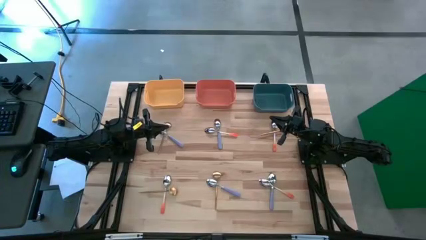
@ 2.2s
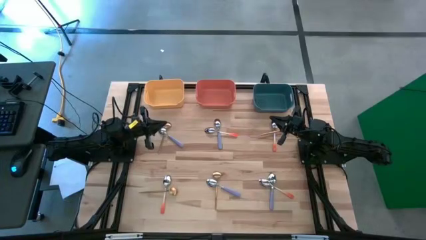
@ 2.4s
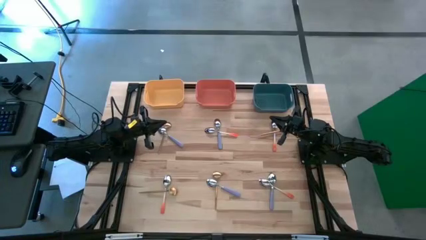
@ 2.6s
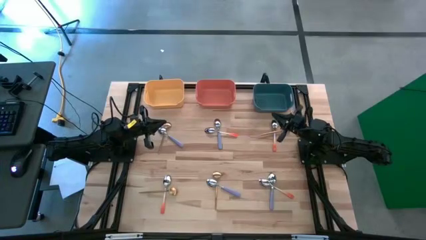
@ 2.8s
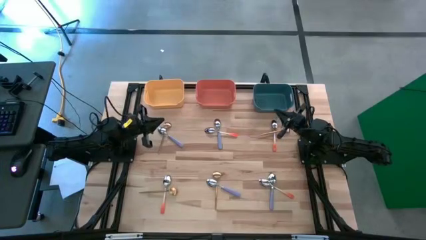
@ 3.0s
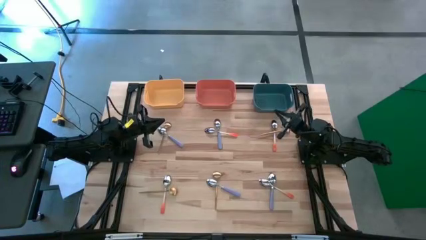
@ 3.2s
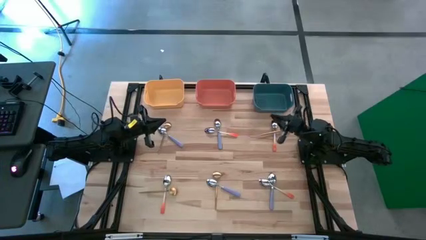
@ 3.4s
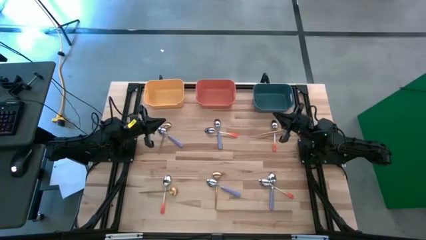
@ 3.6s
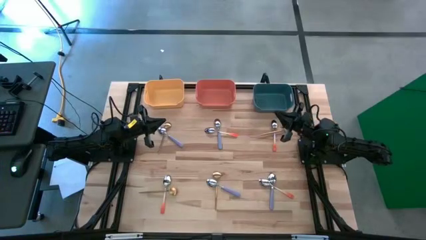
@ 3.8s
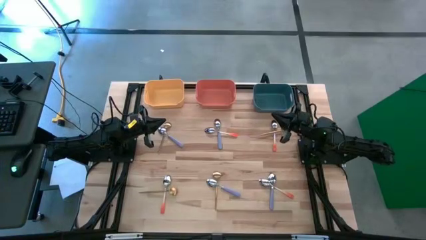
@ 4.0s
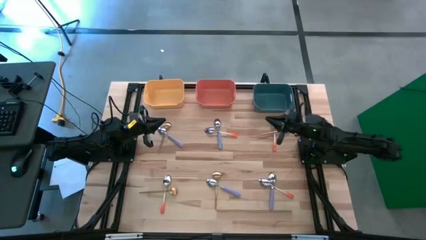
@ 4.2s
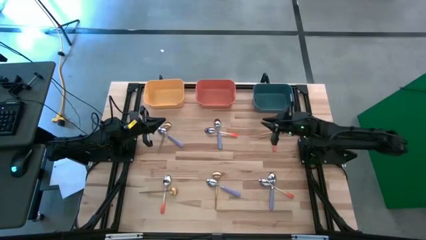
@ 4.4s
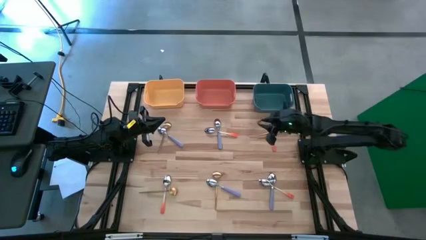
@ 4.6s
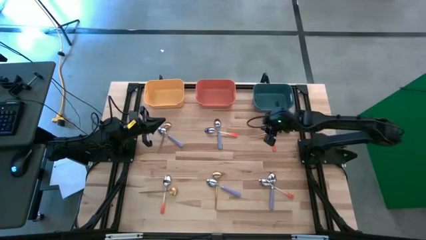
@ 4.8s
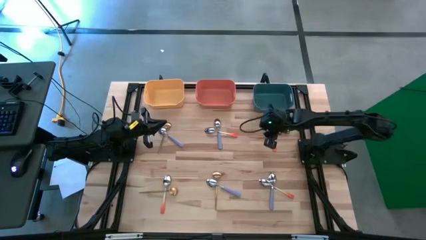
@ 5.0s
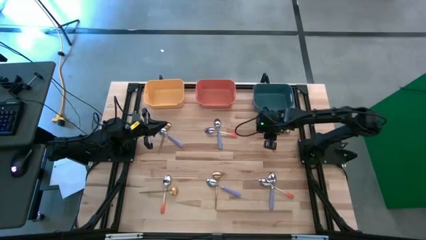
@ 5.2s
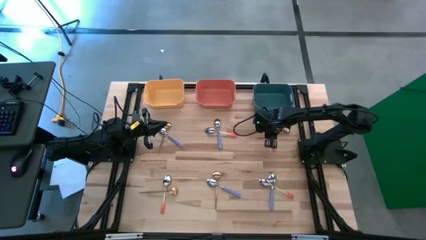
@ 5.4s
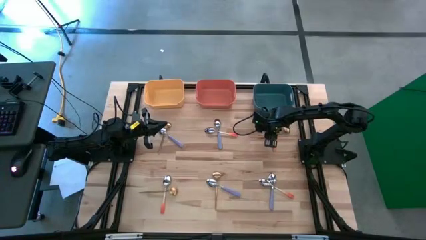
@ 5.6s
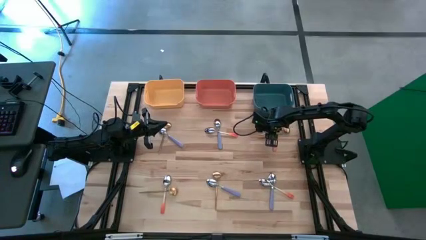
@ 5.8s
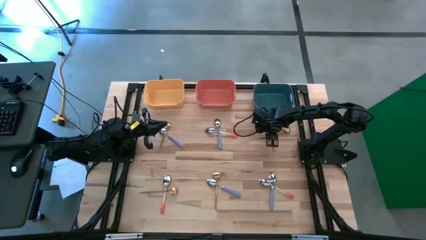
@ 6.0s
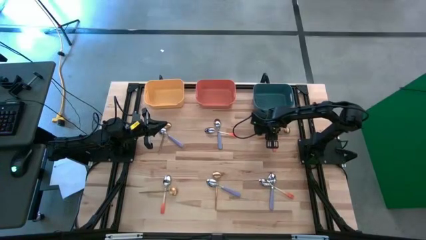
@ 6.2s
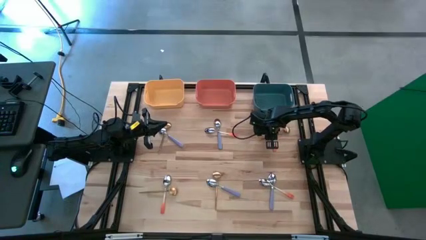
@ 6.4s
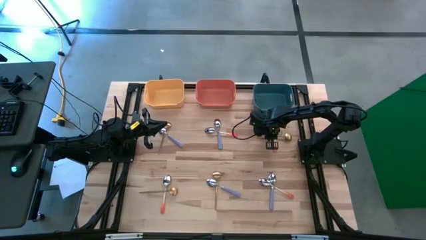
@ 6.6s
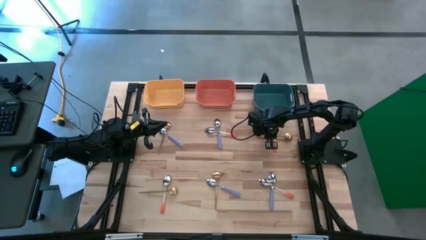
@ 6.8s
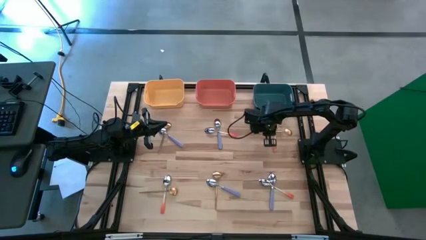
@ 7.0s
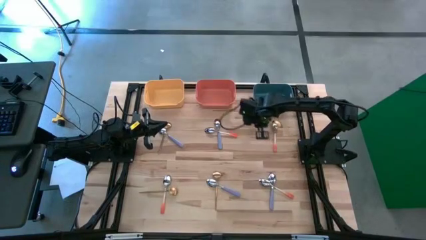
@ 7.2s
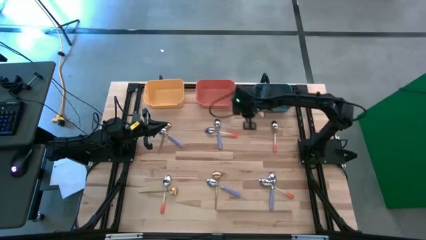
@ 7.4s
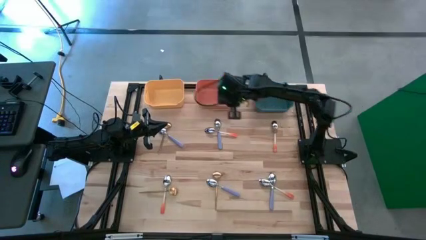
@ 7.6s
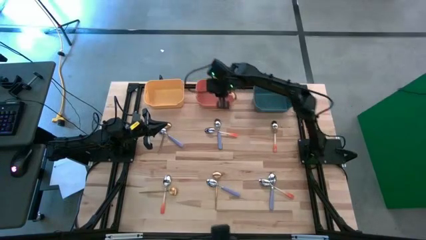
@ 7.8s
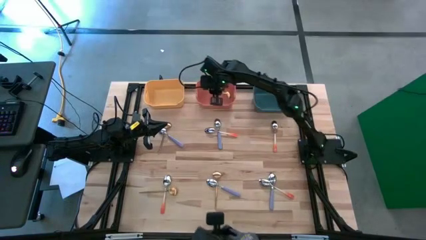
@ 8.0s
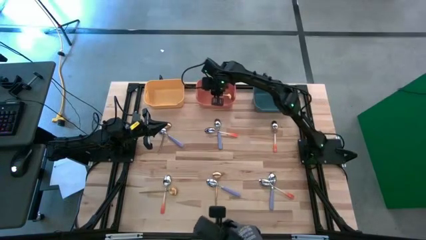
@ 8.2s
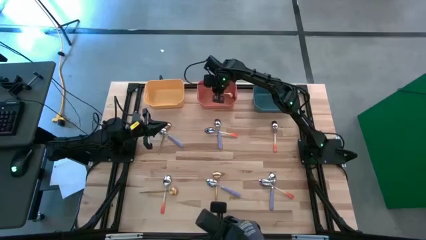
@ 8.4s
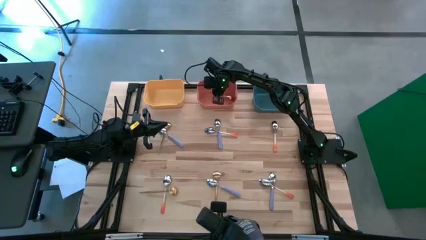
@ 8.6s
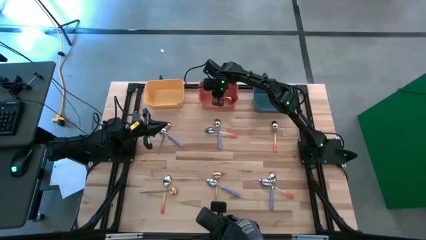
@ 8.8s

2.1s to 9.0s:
Task: Sort silverware by color (type)
Put the gold spoon into the orange bin

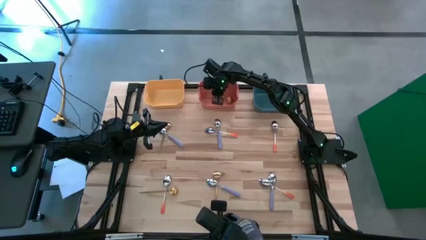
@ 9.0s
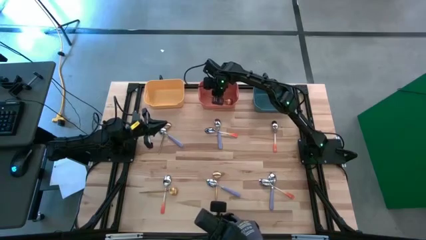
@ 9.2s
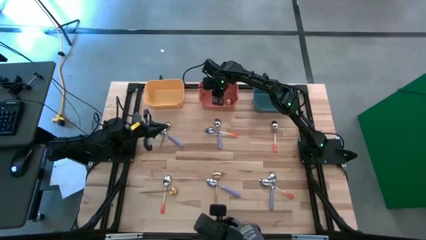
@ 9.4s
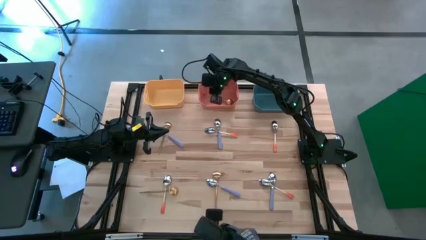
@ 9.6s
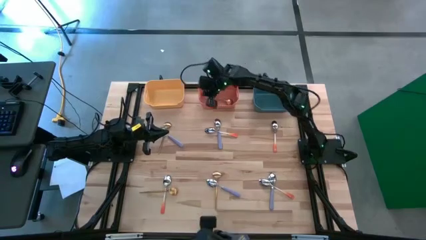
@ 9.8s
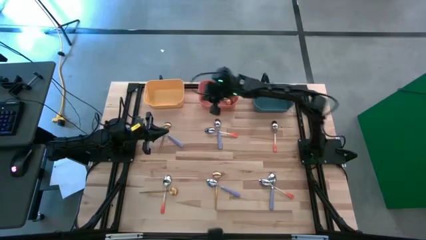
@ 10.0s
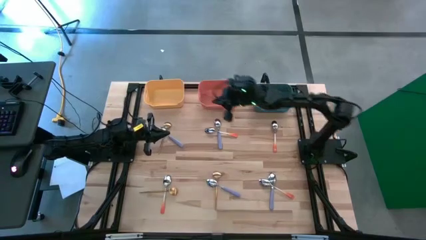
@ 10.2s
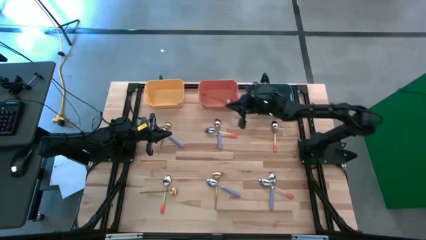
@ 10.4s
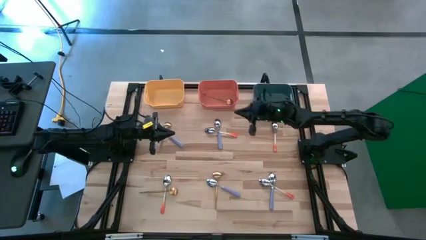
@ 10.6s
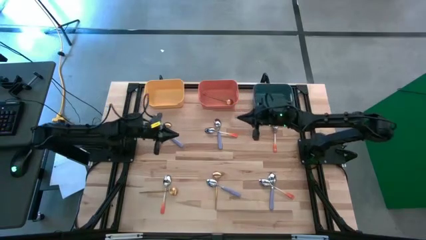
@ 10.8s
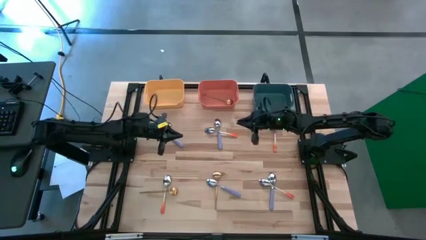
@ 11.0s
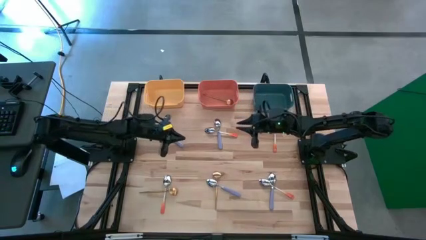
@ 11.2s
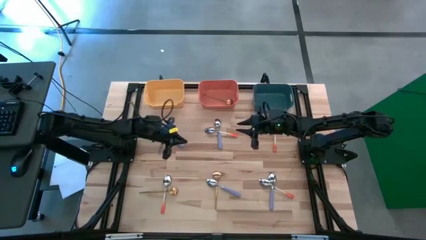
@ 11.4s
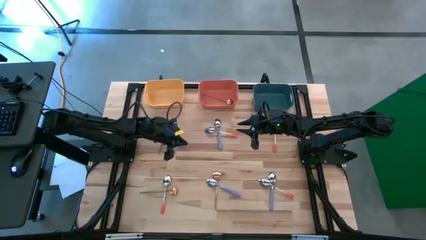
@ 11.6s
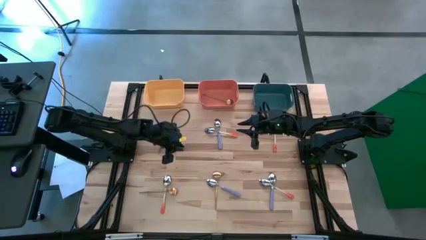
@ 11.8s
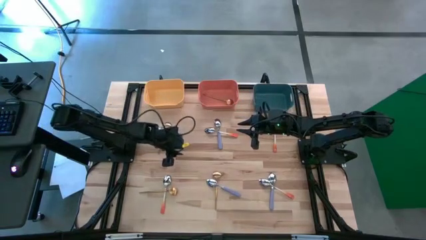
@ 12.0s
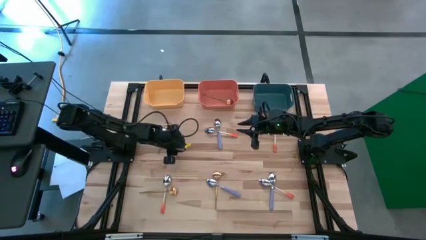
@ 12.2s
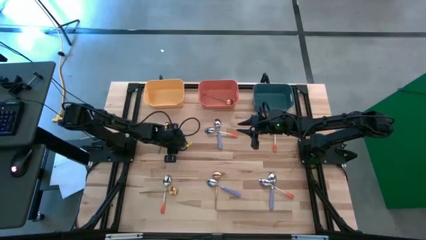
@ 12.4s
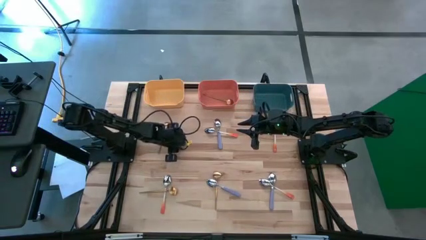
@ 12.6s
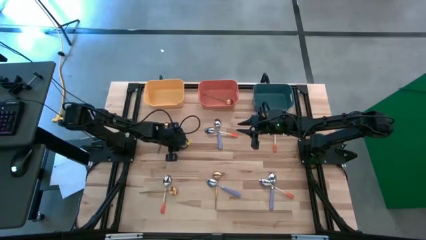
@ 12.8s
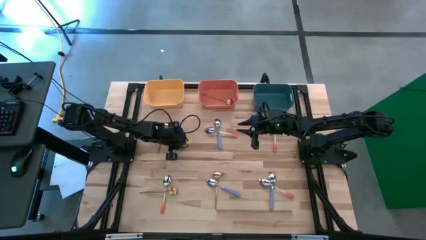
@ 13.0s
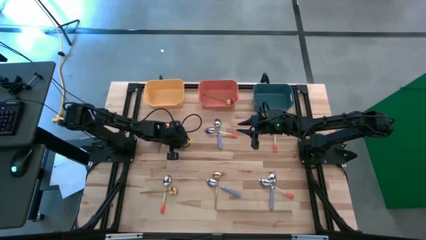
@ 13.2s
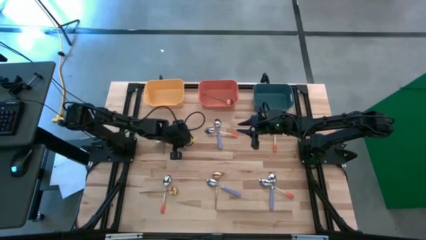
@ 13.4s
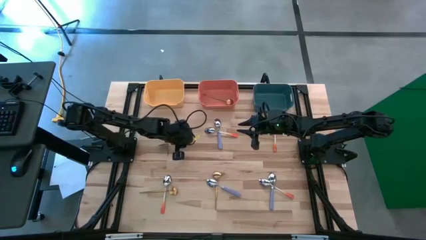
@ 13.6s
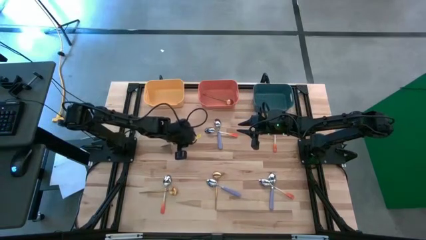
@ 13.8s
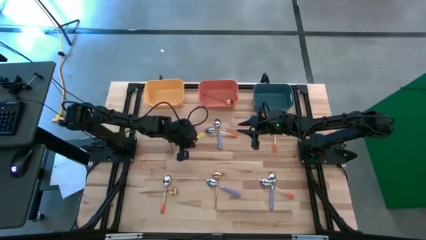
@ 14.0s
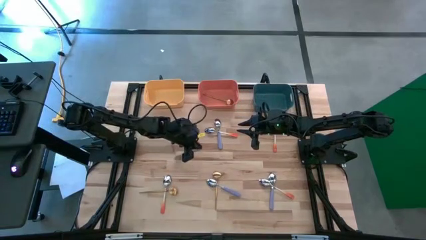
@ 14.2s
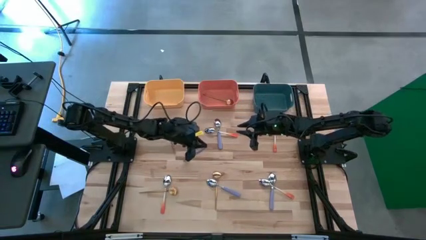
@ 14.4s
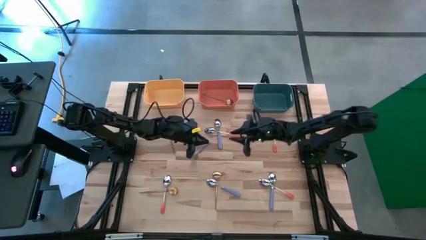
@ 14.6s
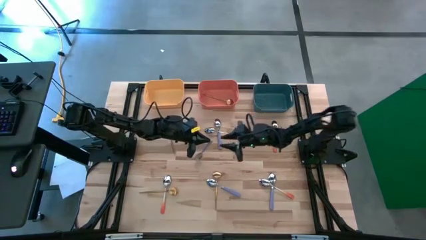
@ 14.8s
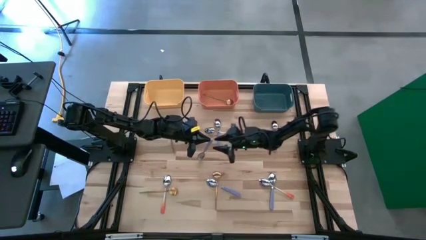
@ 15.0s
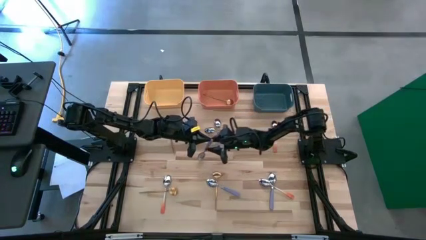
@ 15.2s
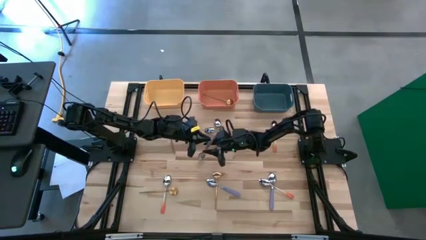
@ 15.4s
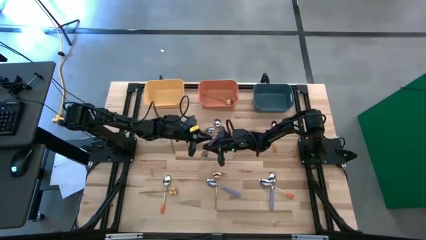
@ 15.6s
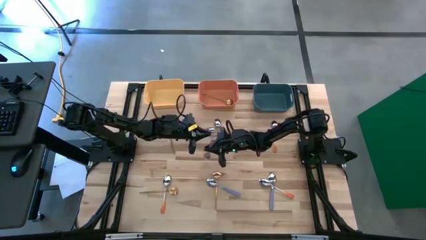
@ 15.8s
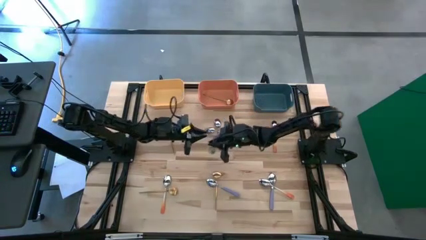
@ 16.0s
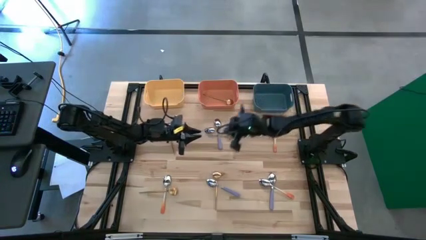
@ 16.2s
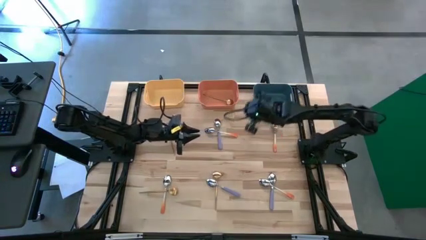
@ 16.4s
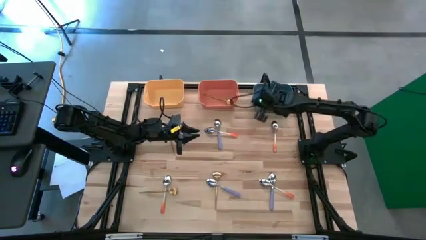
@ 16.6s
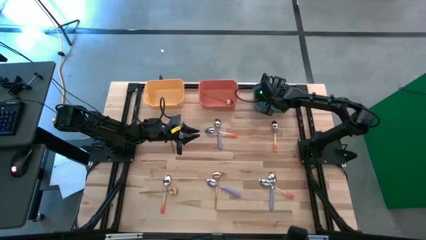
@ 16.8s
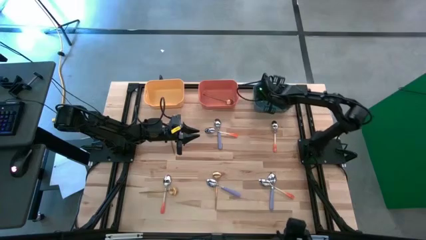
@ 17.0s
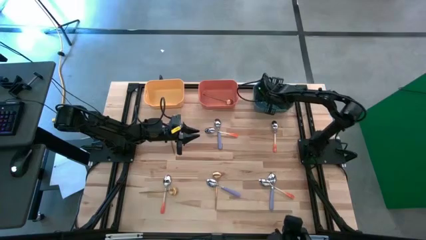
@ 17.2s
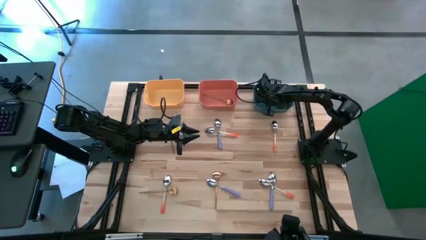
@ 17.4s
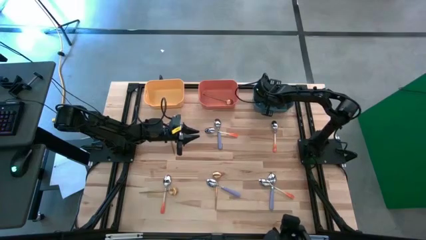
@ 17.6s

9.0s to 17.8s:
Put the violet spoon into the blue bin
